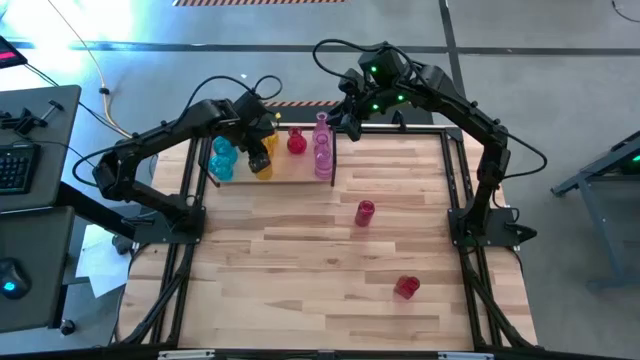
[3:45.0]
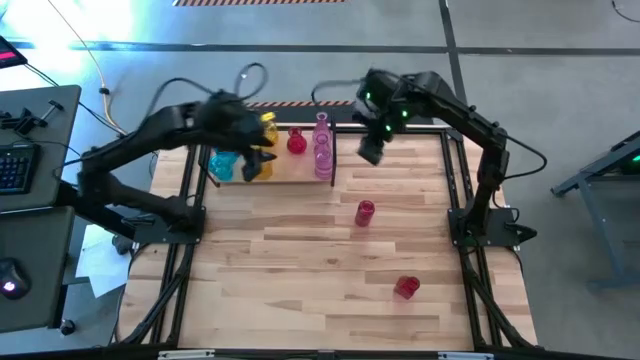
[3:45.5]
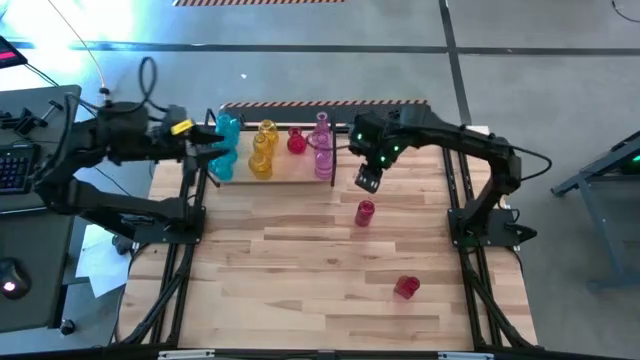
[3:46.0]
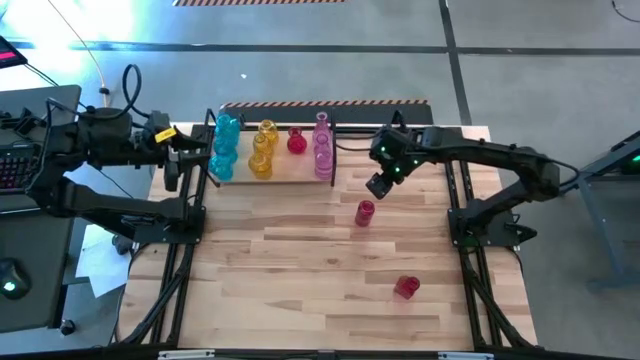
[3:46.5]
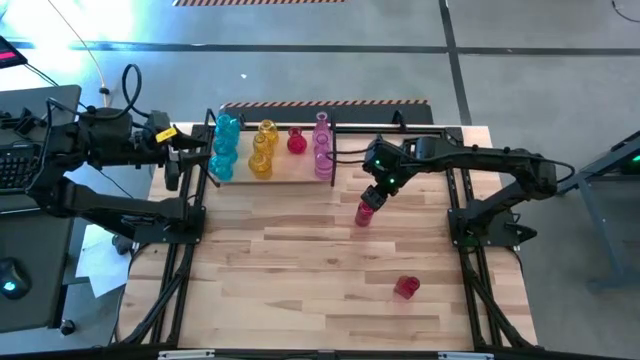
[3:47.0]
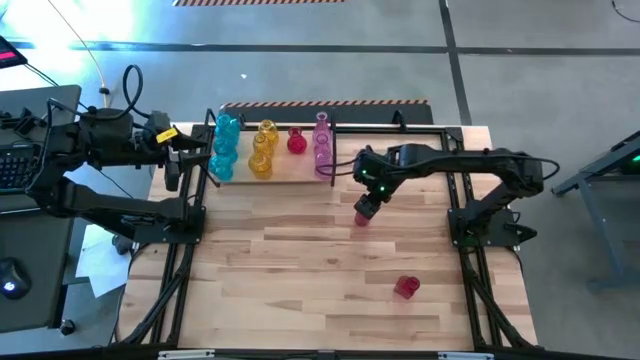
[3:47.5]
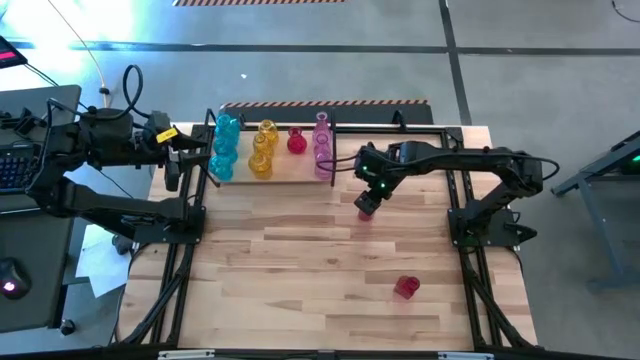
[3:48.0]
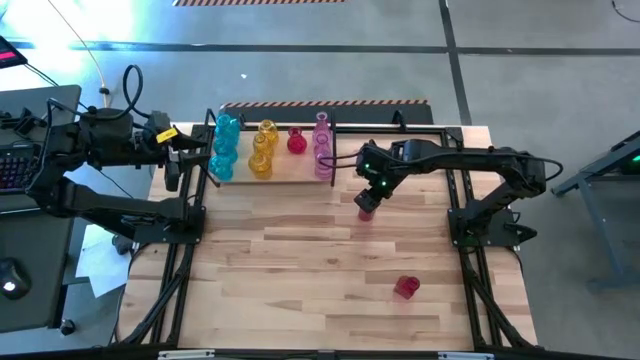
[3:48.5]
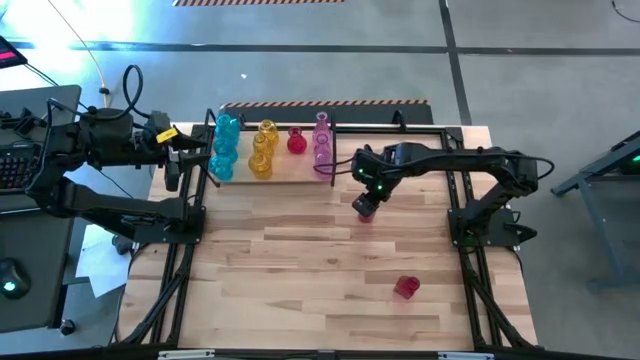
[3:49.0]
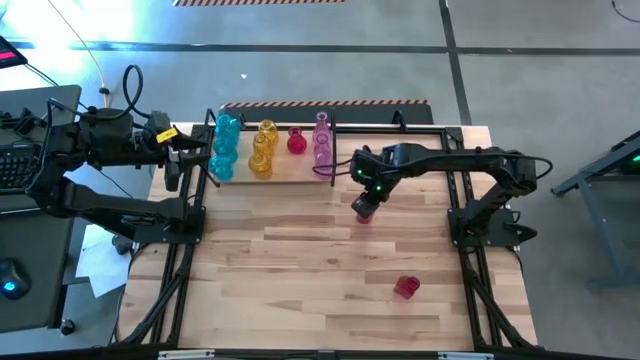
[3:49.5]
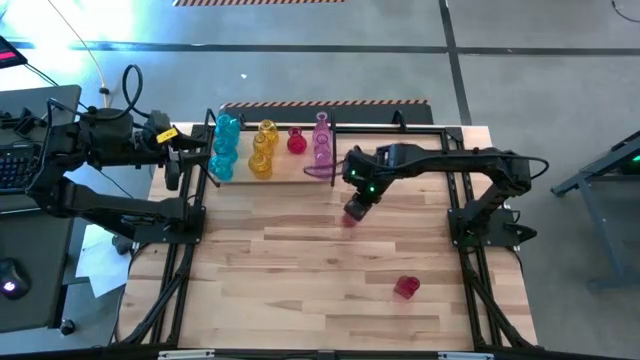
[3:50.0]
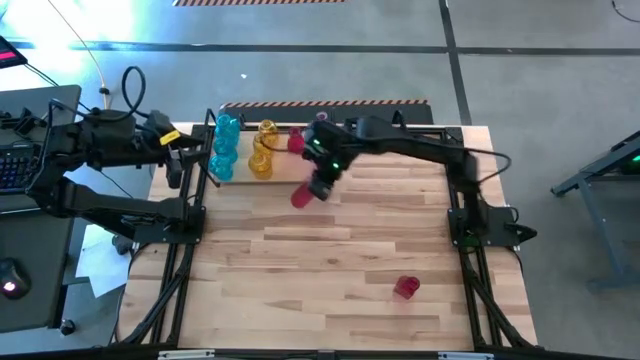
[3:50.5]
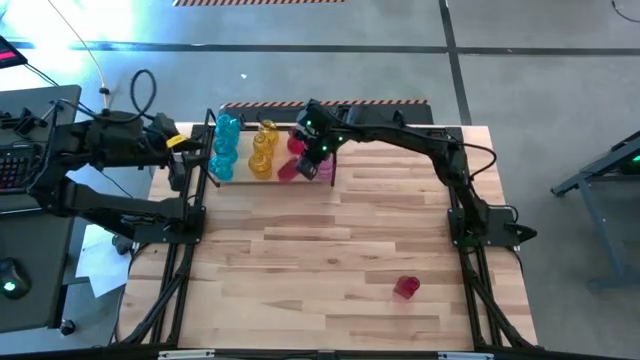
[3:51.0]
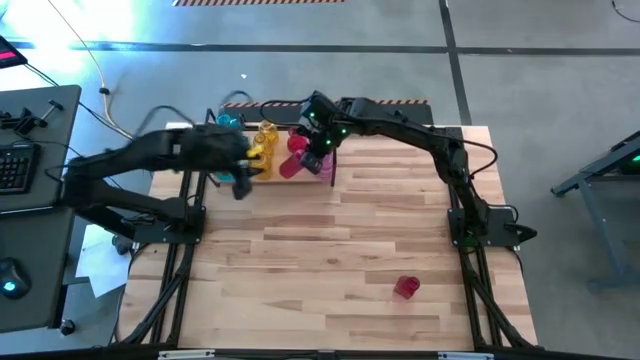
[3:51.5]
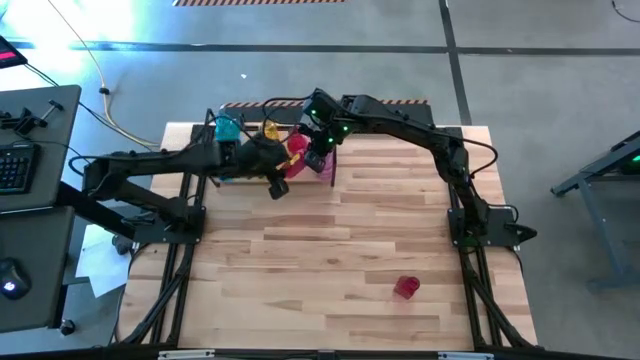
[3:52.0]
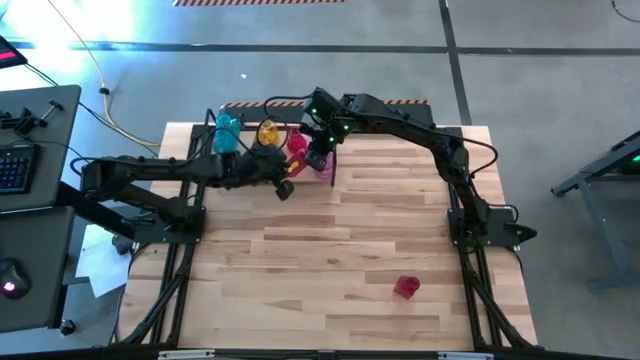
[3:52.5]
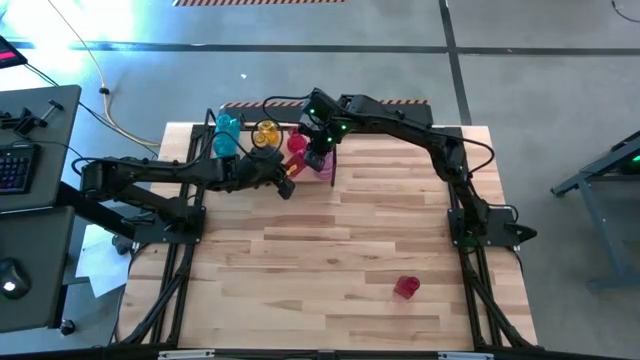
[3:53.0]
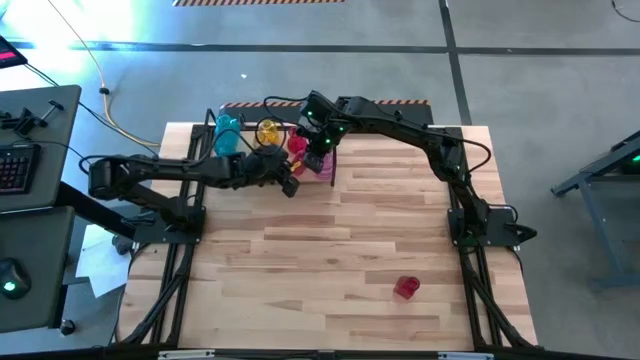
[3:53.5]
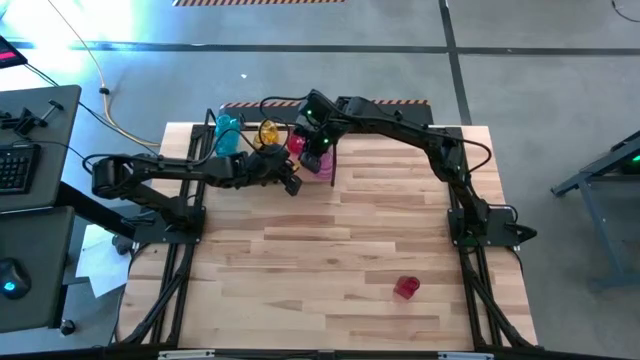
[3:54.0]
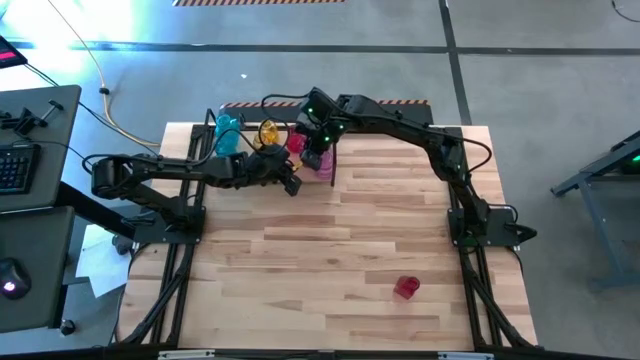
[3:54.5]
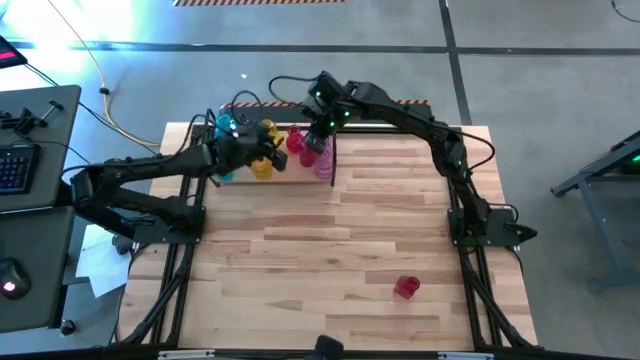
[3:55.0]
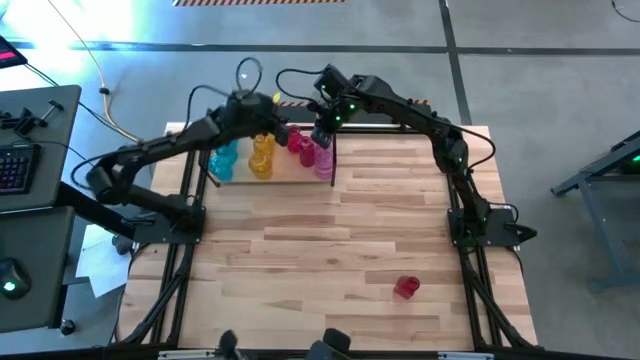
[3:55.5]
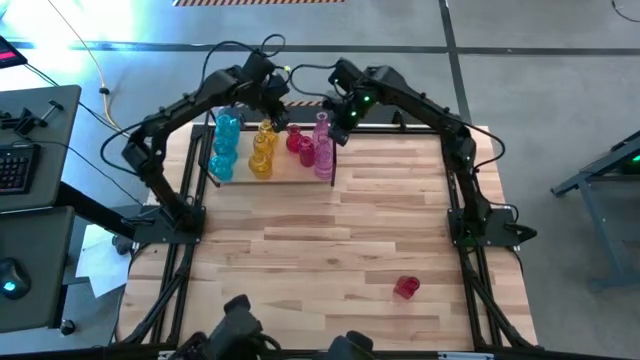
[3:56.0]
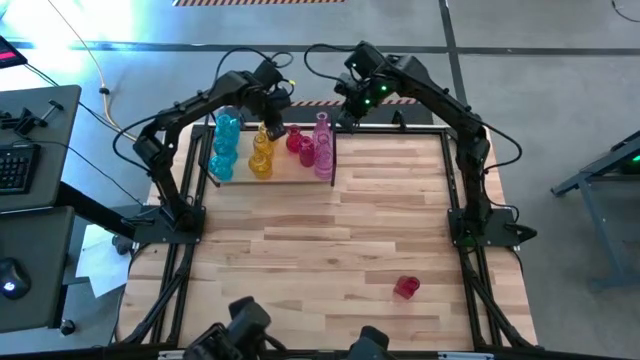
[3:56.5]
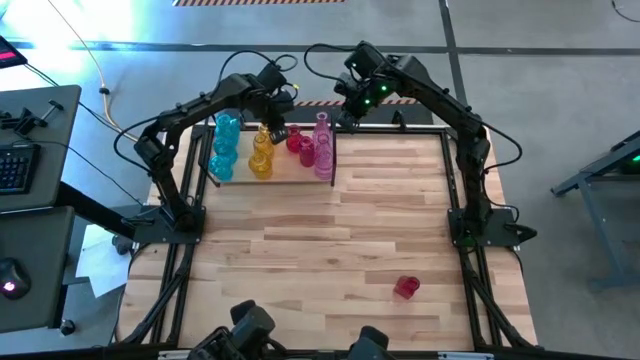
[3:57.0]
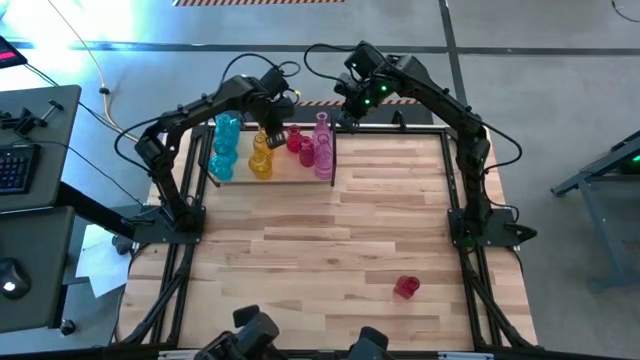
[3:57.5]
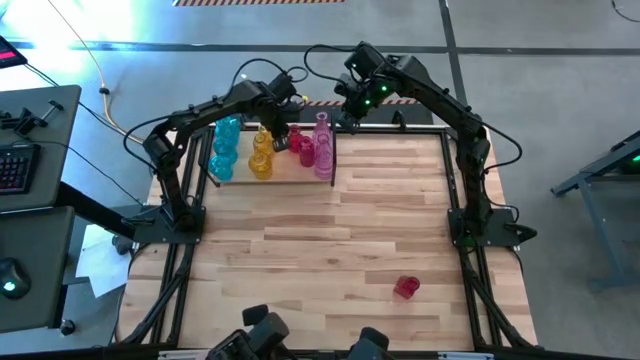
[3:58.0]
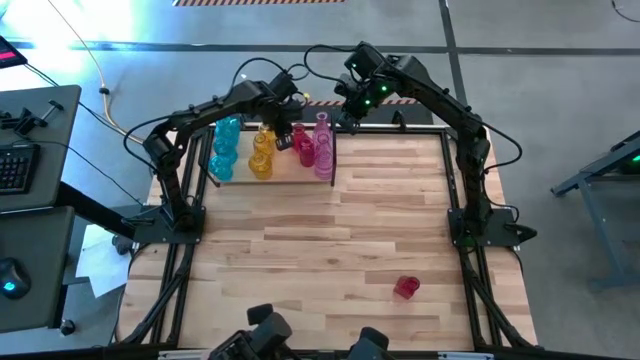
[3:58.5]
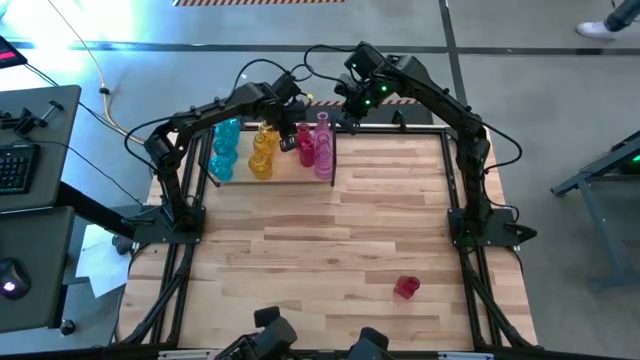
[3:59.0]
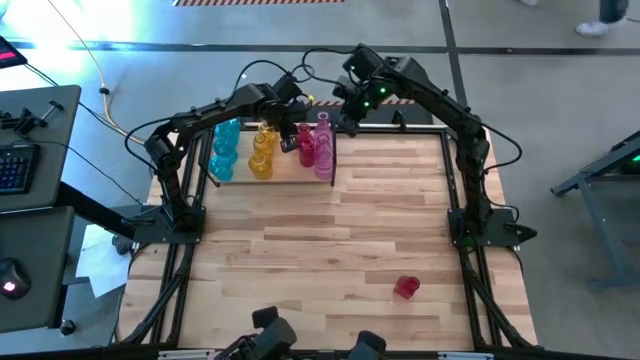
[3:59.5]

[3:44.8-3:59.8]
Task: sort vases onto shelf
Put the top red vase on the shelf aligned with the other red vase

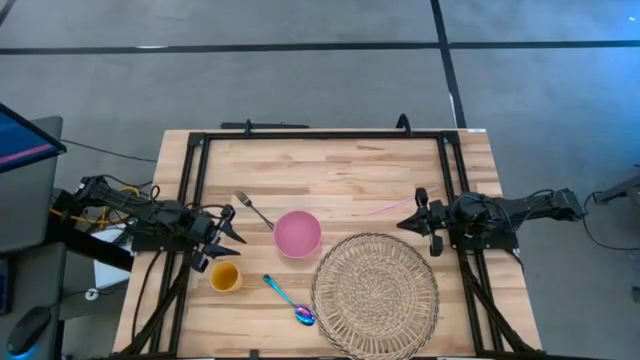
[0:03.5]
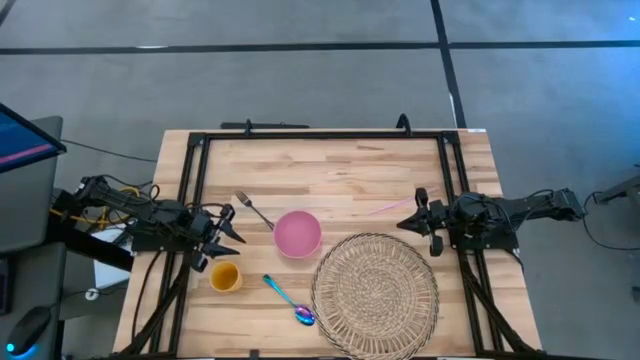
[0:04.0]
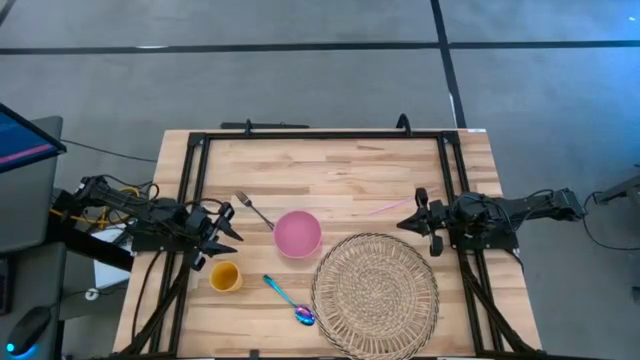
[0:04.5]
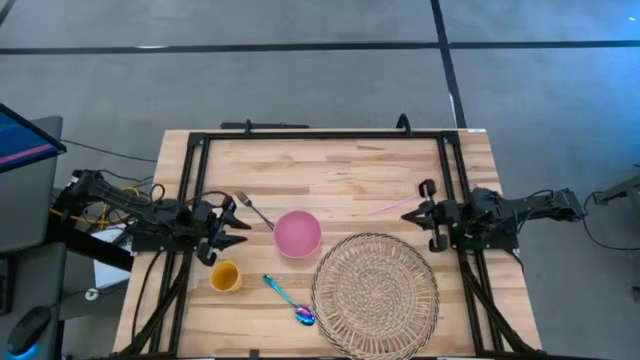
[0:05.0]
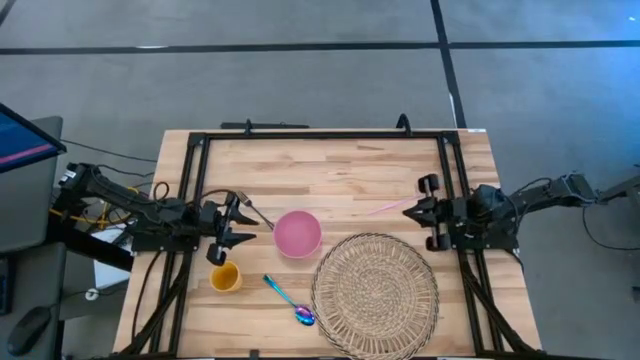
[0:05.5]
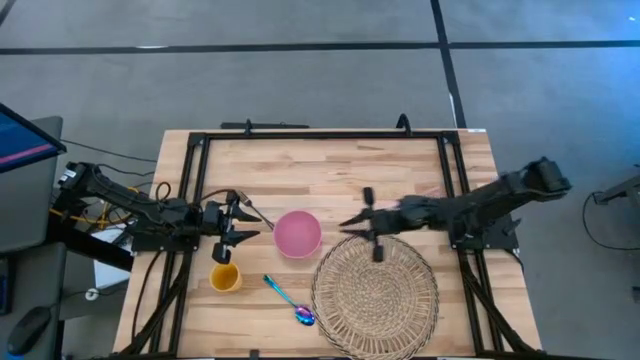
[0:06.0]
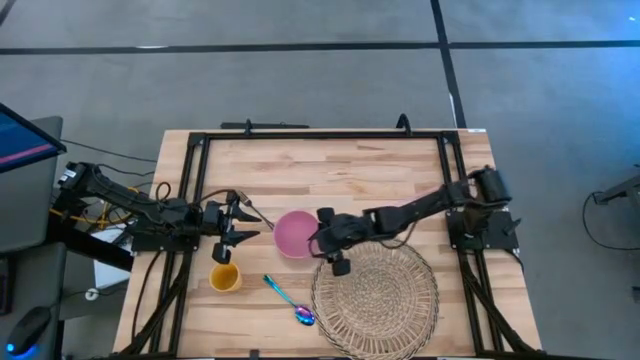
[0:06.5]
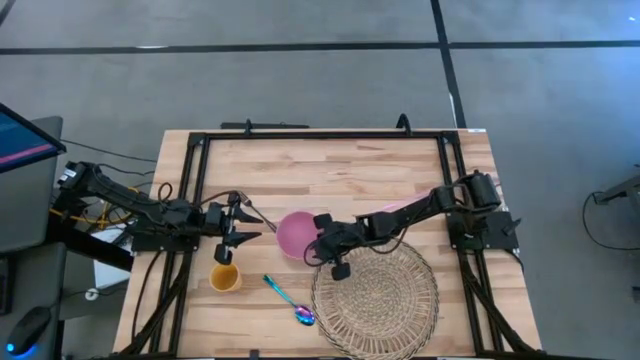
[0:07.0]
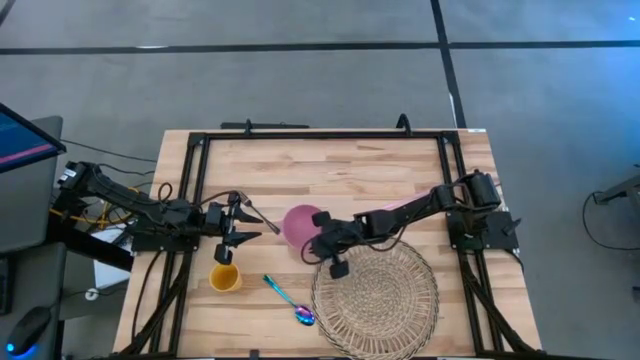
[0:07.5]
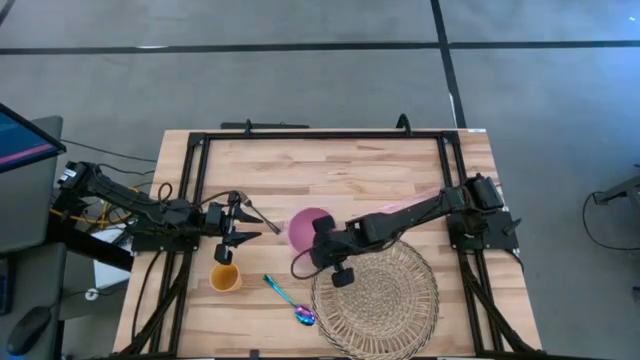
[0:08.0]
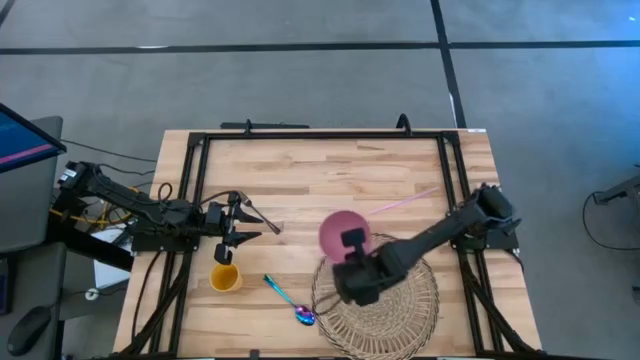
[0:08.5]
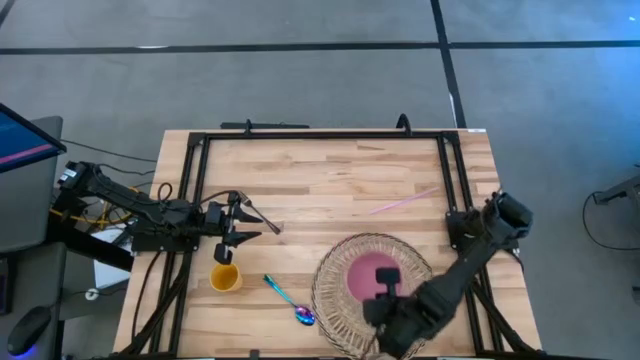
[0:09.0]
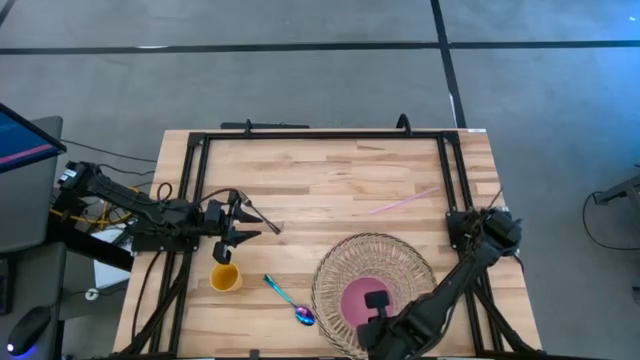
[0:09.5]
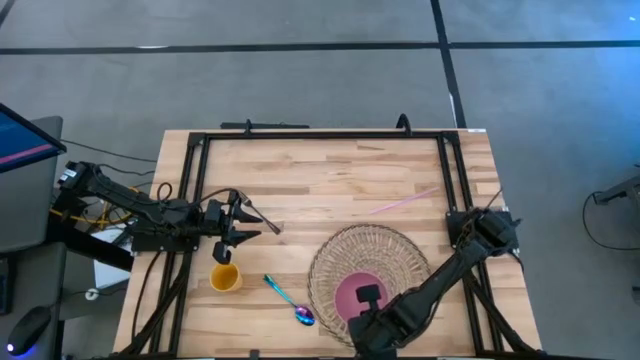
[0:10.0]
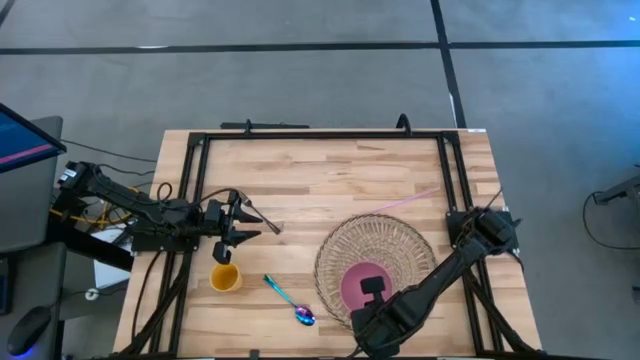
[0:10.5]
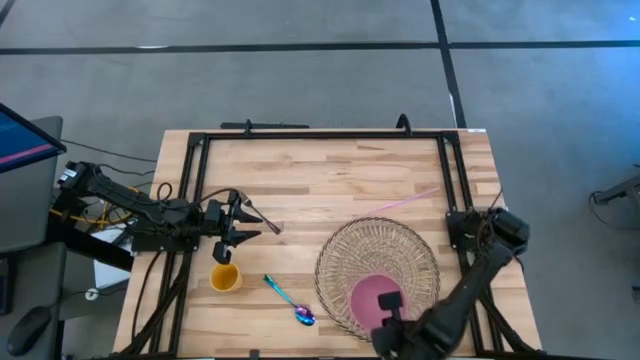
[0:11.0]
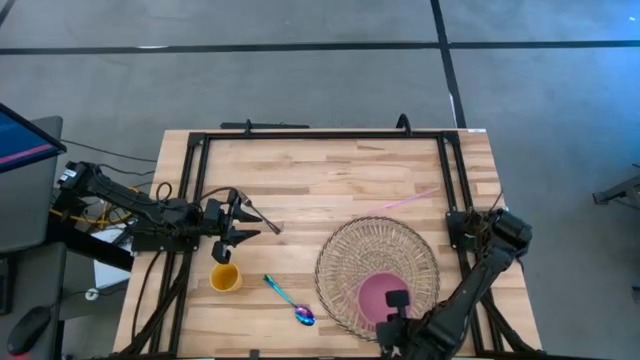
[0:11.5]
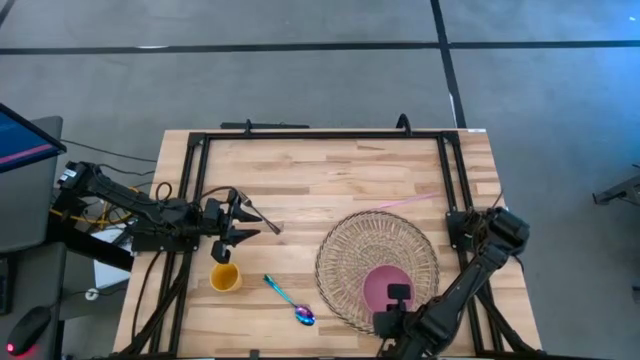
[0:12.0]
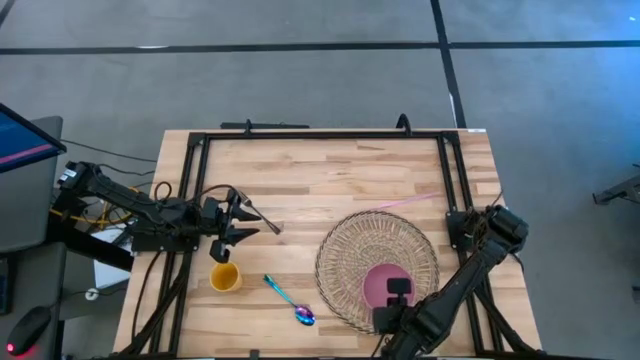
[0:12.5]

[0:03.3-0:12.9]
Task: Pick & Place Utensil
Put the pink bowl on the brown mat
